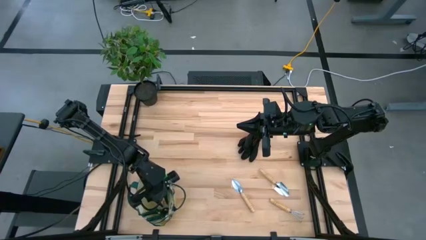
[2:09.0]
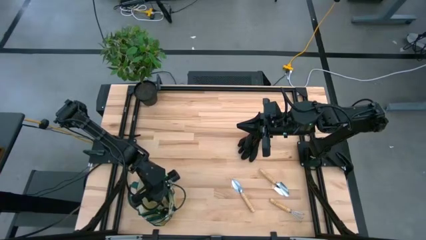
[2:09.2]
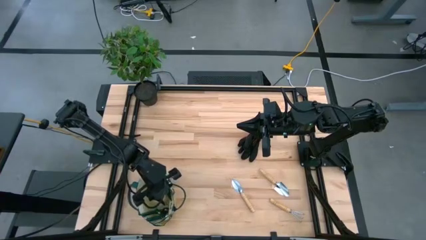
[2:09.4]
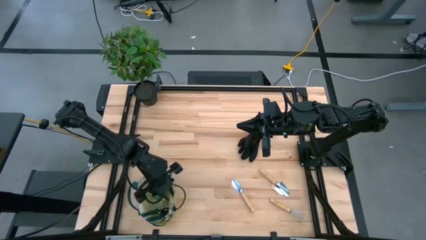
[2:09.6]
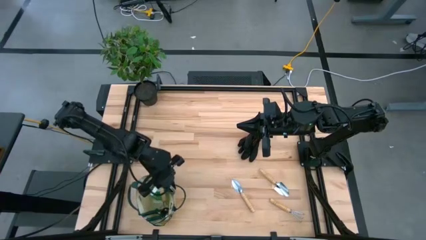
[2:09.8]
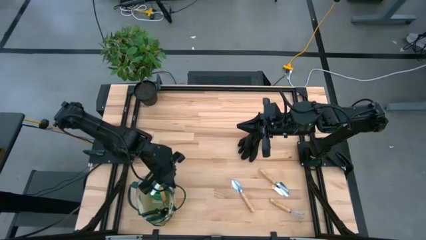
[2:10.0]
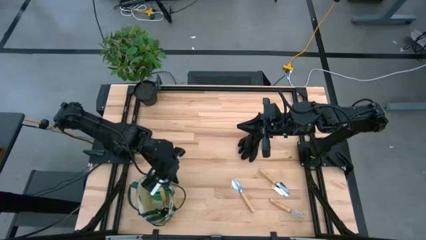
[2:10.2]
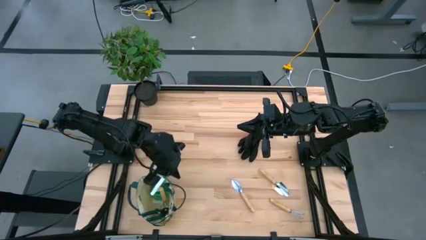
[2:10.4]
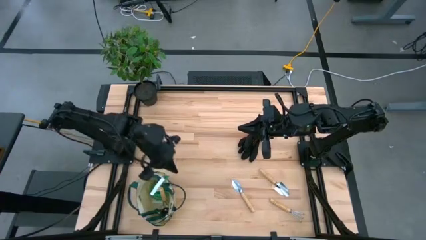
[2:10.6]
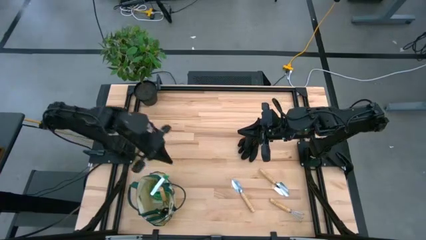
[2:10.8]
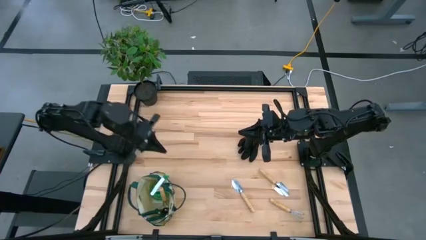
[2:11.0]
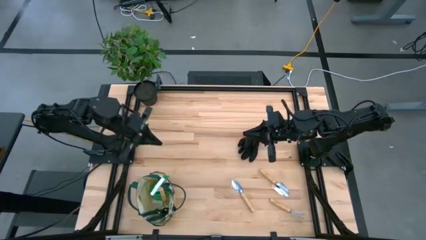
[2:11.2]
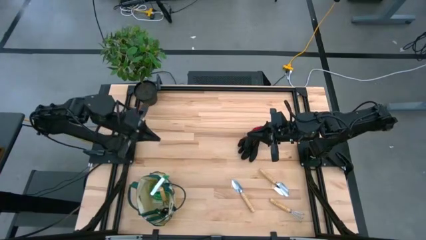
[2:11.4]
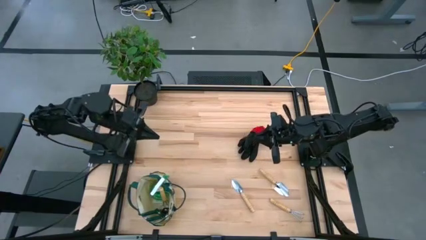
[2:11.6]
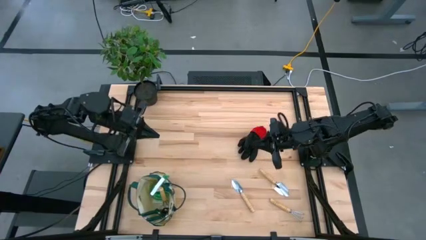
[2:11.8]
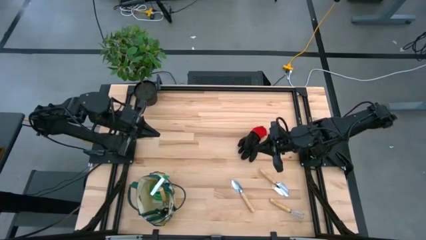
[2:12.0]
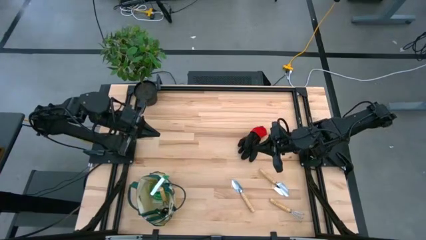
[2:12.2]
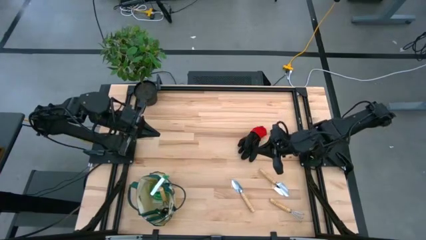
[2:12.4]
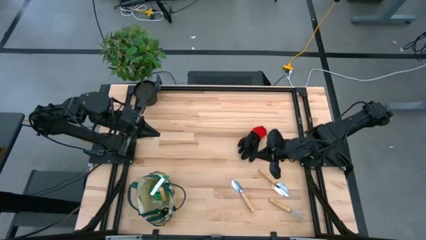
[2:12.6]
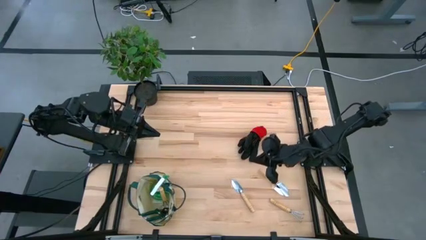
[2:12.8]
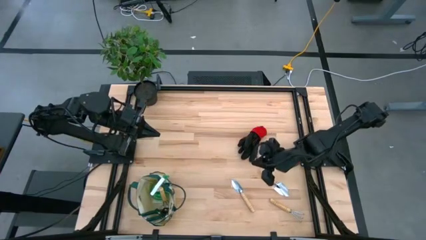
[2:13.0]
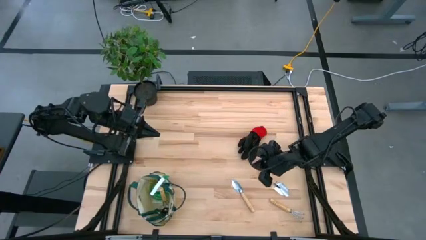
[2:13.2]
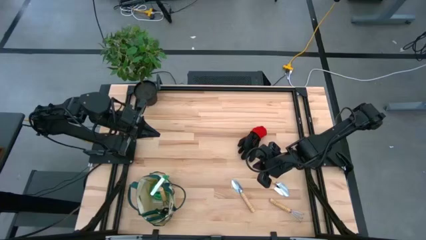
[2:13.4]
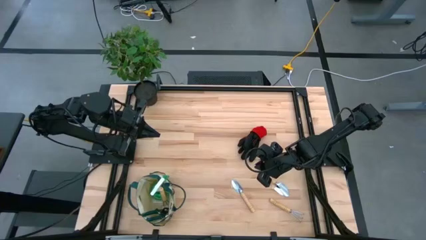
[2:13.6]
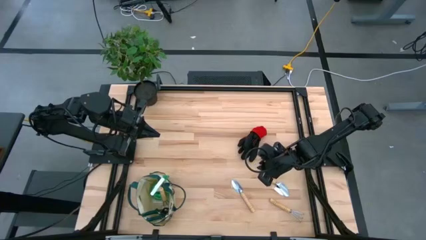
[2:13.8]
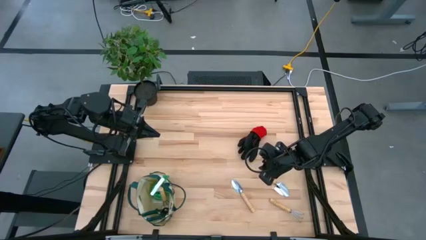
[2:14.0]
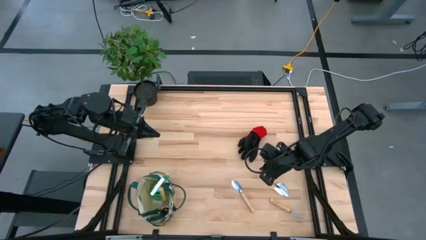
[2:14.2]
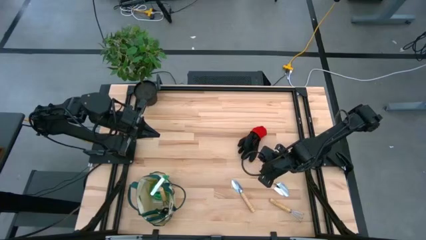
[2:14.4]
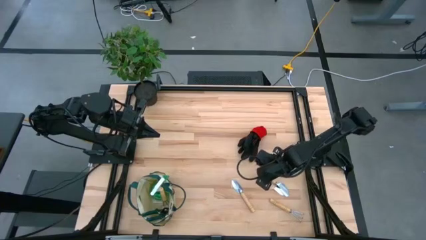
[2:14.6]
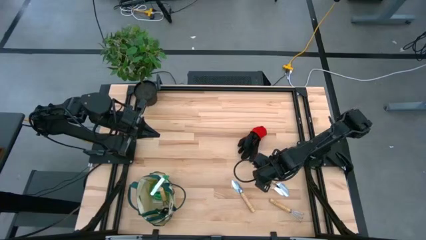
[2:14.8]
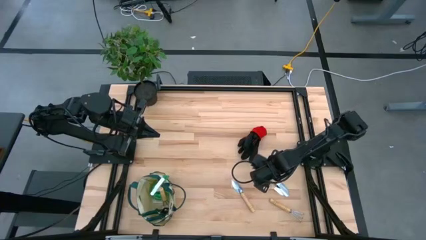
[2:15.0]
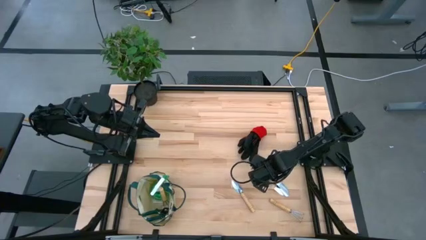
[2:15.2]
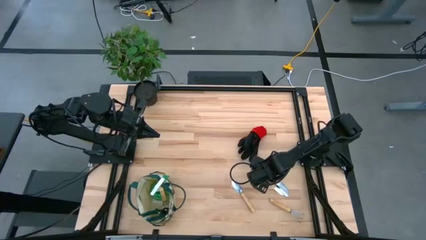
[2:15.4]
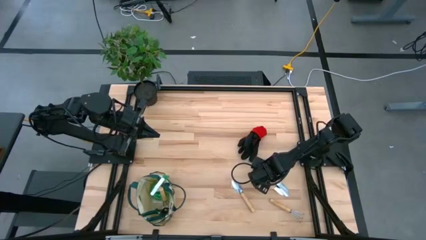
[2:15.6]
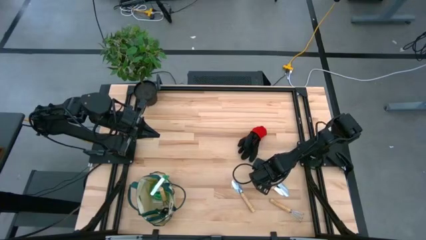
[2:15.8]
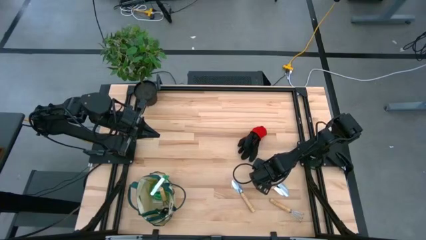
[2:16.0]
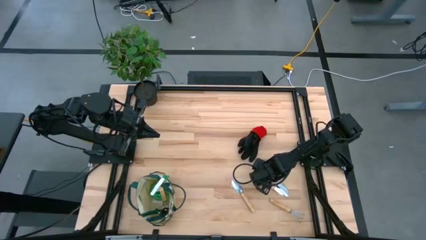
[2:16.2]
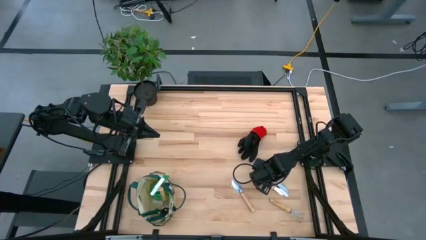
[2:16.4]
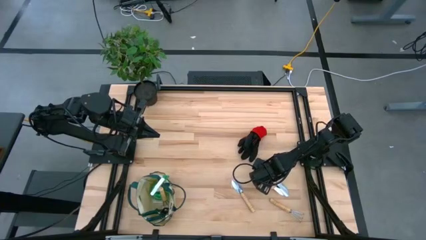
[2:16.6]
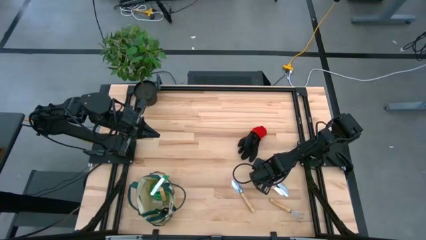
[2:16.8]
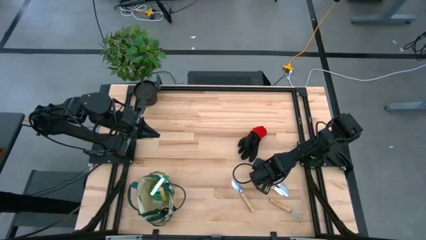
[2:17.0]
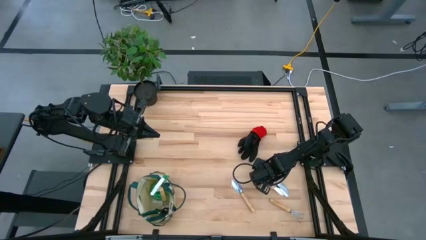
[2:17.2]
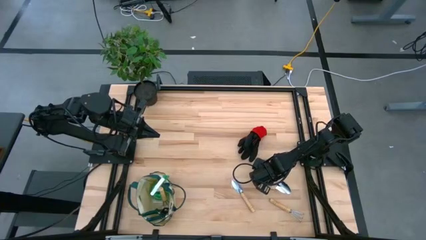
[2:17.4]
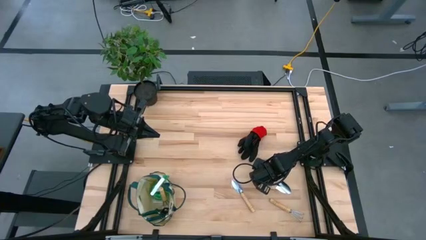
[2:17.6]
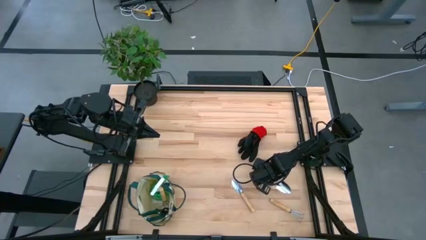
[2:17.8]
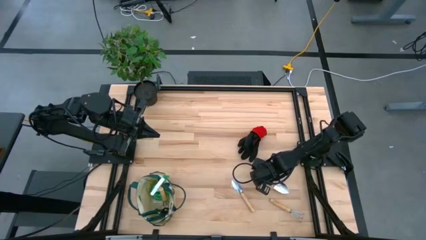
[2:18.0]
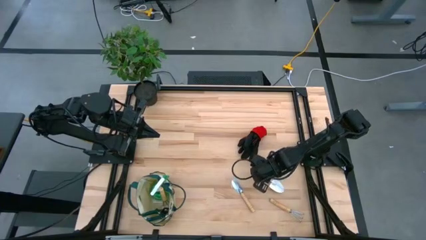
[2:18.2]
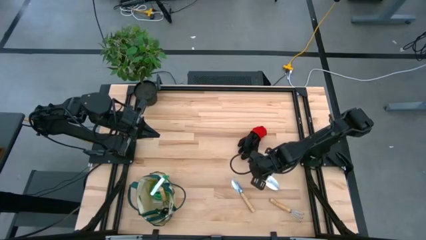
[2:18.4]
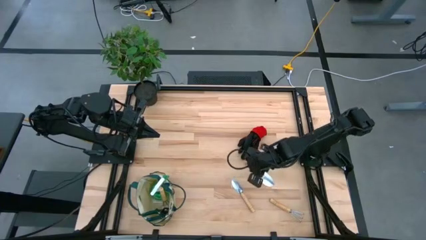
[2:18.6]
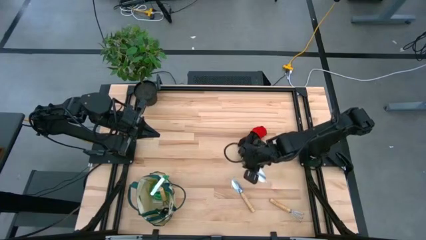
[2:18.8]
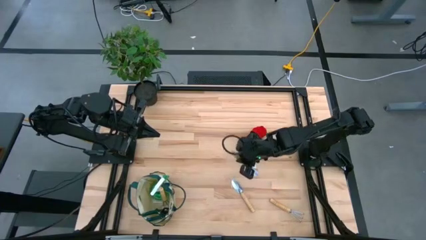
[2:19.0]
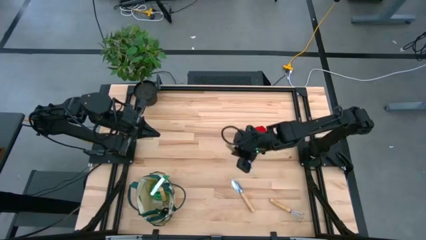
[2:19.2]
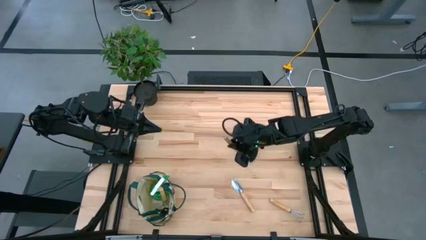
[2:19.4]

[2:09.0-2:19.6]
Task: Pick & Place Garden tools in Gardening bag
Put the right trowel into the gardening bag
